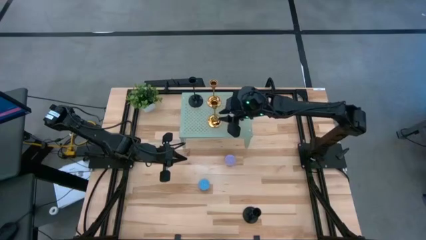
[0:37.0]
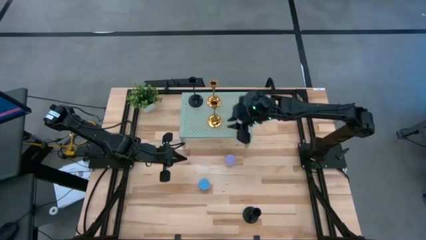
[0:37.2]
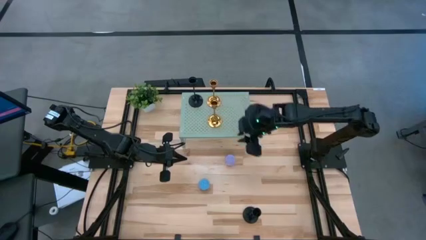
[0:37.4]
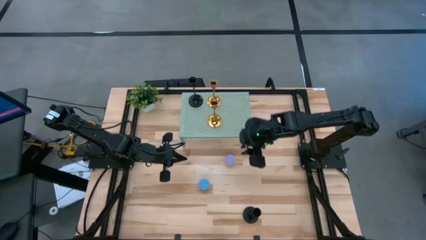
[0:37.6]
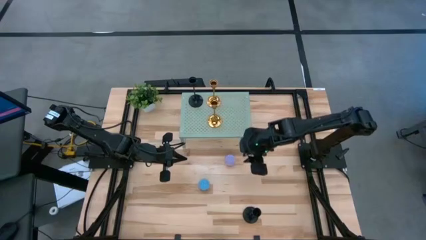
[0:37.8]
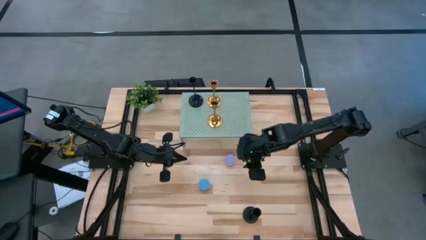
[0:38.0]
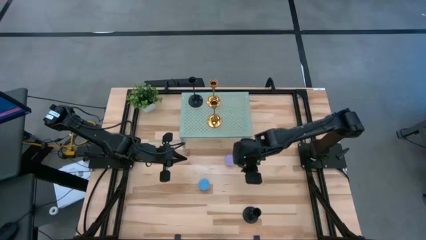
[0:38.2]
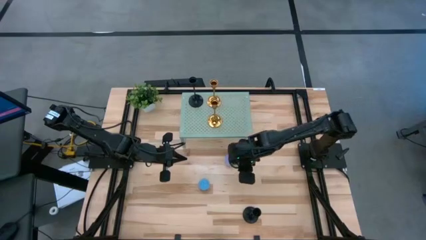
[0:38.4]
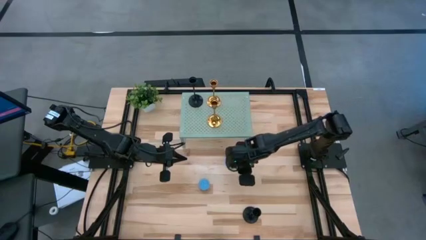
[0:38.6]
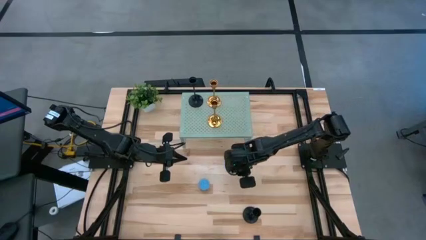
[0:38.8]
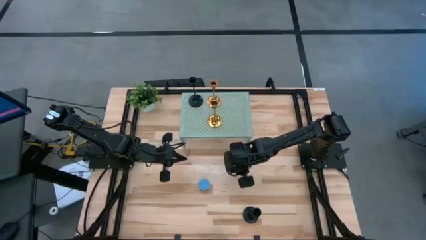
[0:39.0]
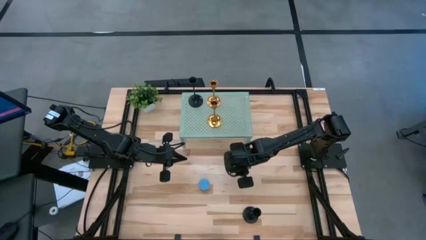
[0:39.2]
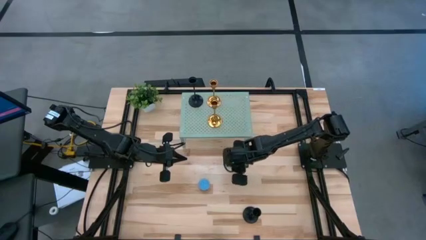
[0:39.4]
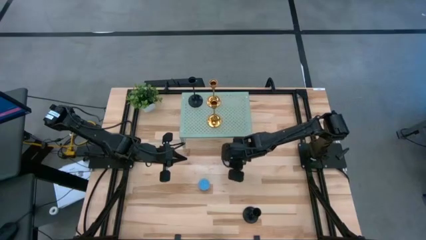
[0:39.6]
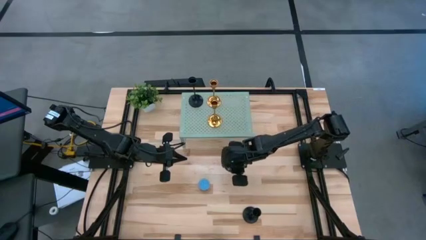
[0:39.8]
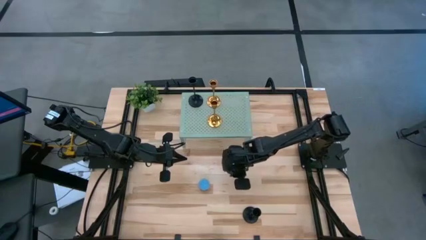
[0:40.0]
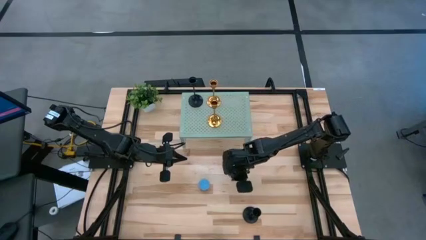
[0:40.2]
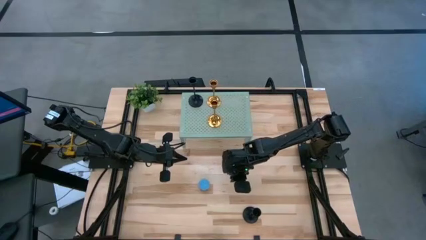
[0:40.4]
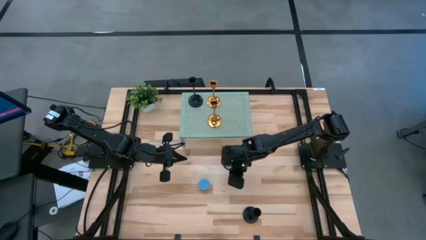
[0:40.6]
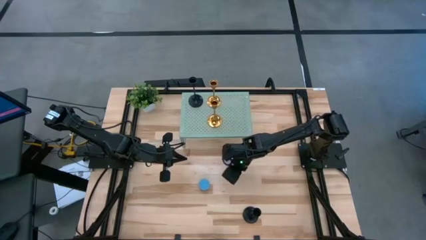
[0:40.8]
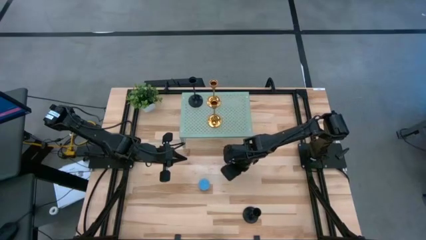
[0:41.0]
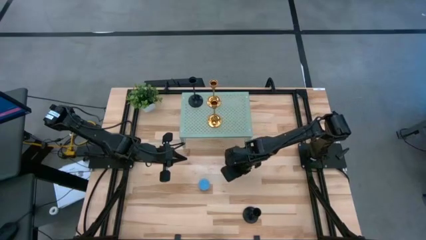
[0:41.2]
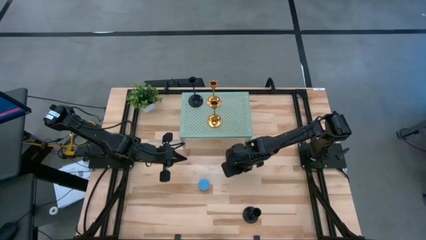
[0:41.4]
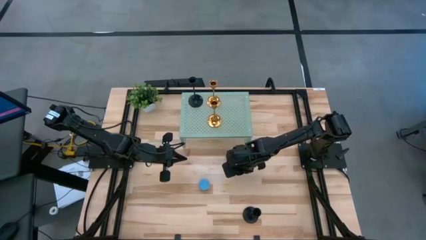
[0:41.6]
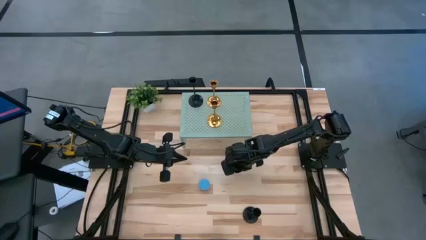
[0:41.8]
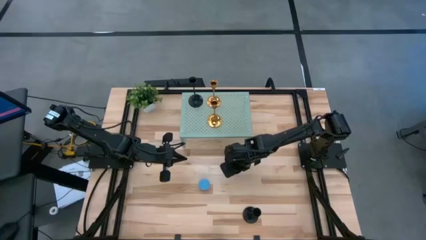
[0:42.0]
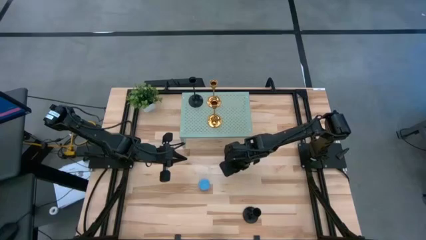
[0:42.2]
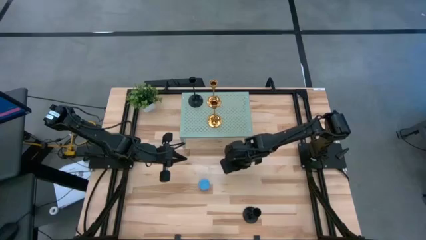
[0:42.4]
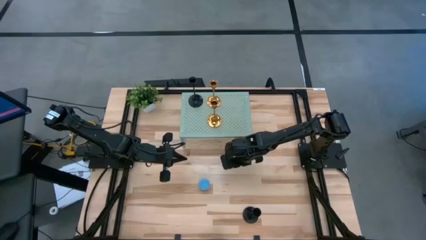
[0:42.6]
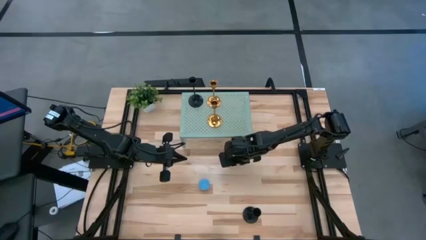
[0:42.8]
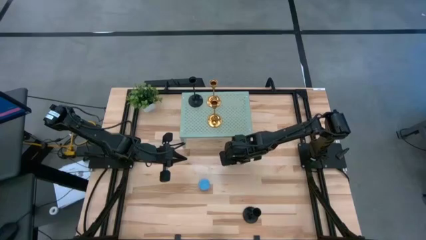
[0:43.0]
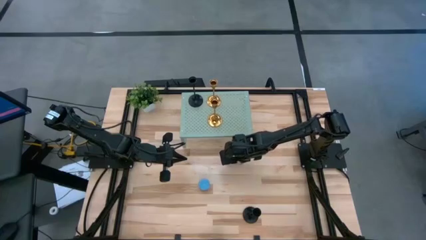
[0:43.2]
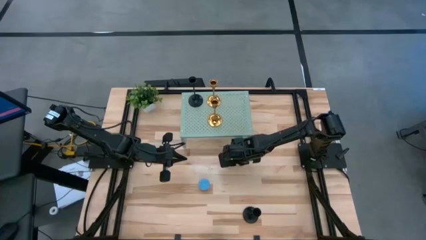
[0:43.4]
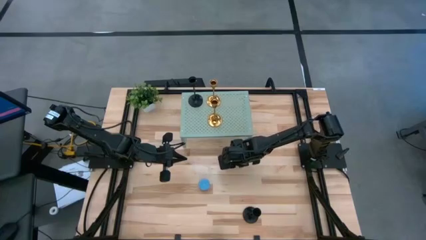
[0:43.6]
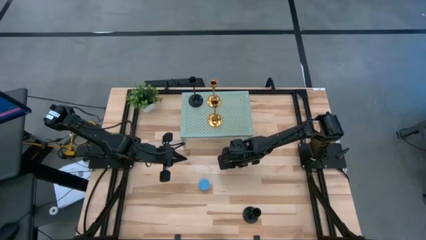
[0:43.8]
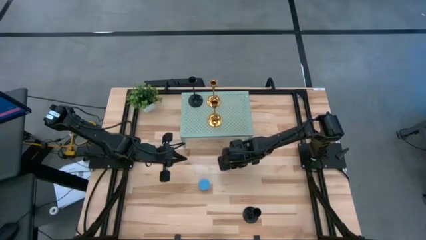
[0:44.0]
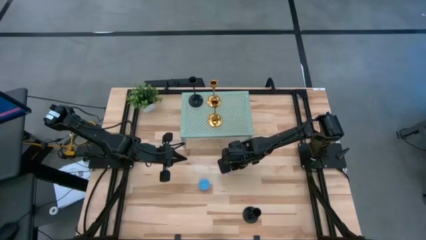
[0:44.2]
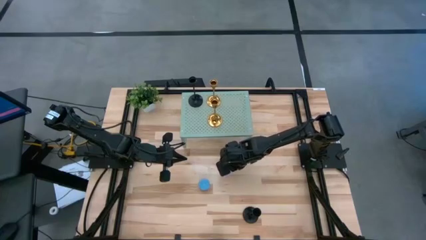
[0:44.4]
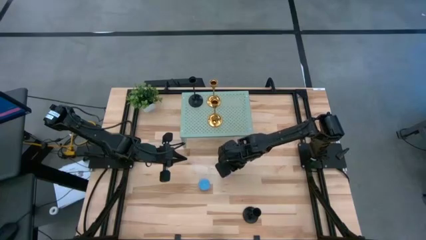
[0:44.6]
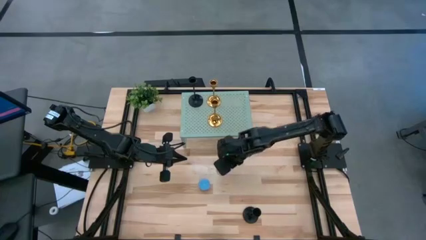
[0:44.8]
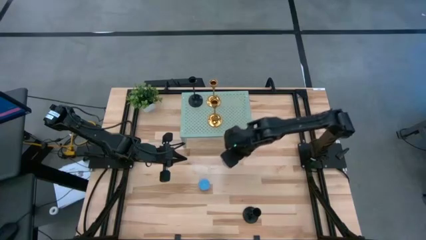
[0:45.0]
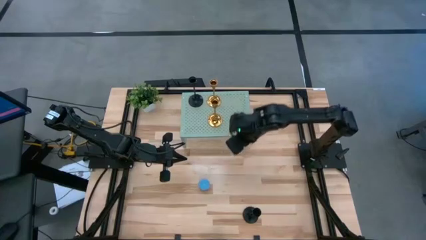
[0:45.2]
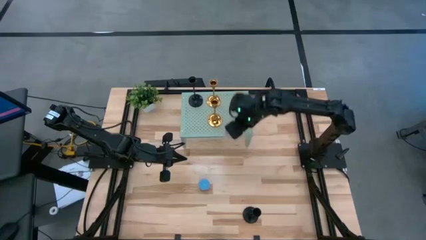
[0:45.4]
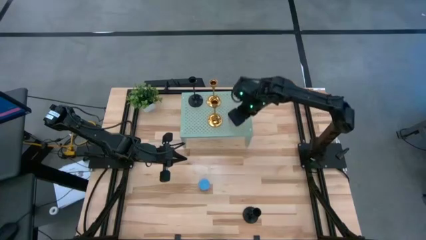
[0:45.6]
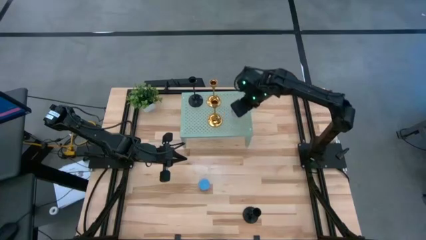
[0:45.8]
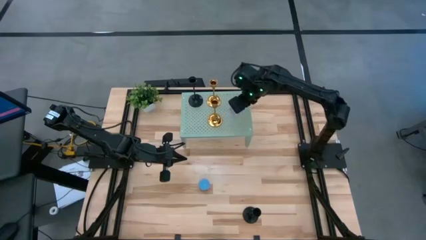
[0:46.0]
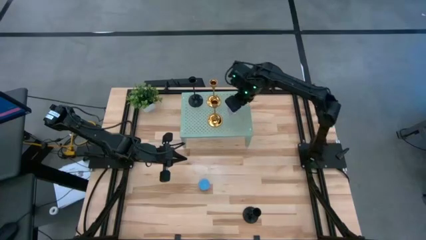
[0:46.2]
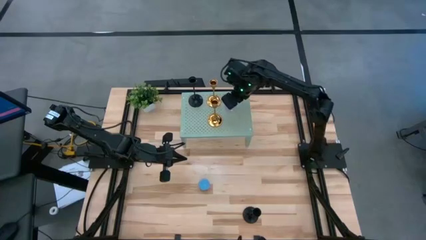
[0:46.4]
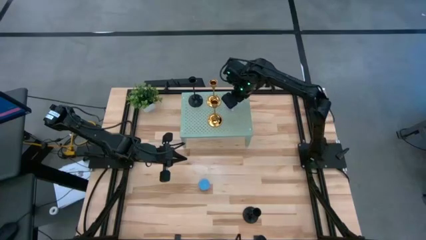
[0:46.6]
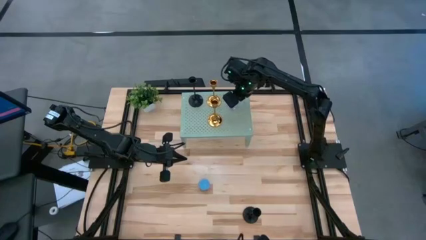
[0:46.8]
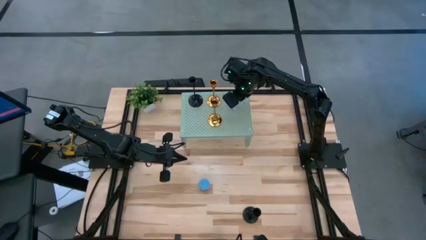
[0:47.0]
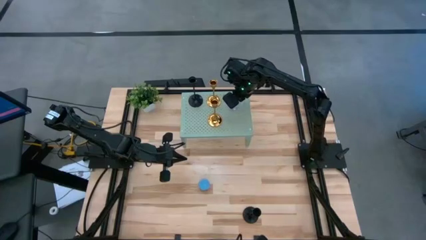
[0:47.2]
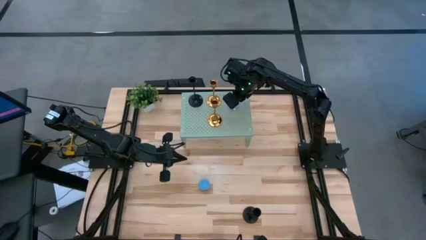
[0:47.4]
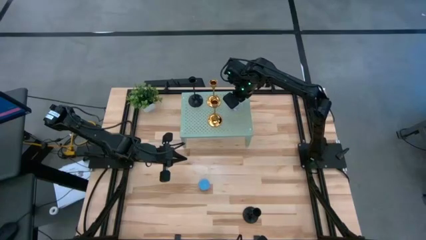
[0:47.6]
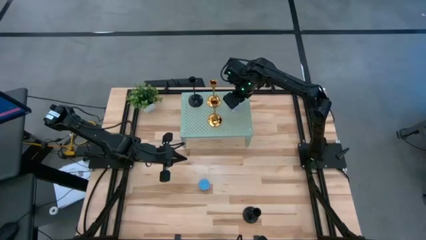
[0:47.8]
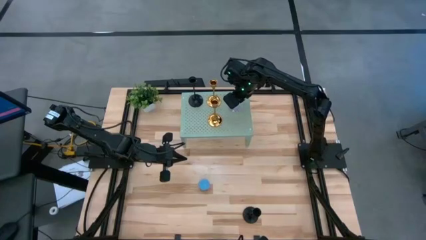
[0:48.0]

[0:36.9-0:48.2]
Task: Pick & Place candle stick holders
Put the purple scented candle on the shelf
